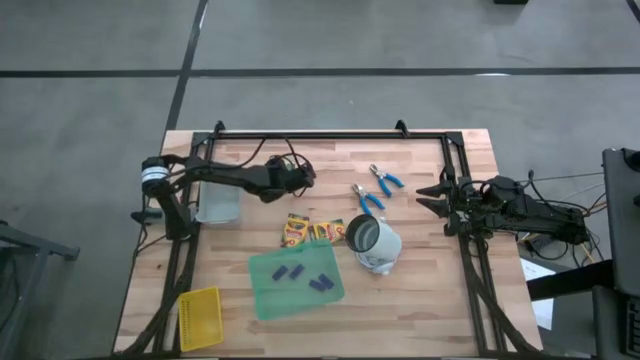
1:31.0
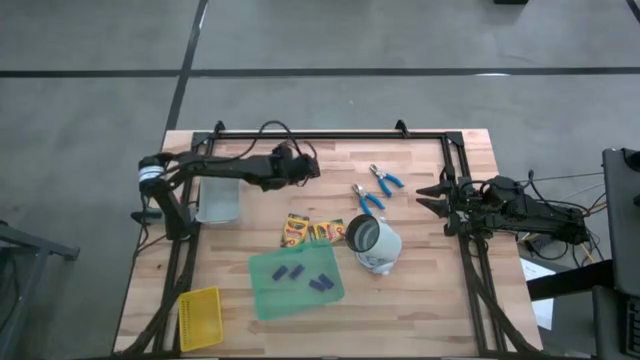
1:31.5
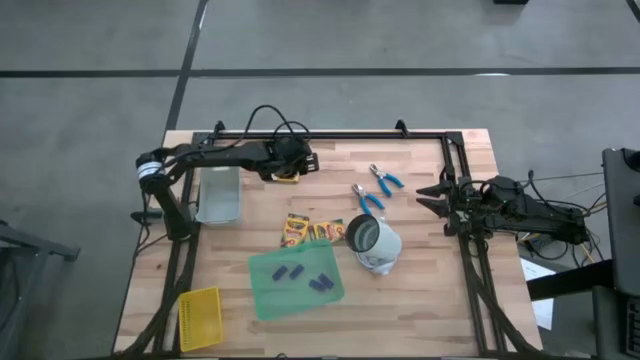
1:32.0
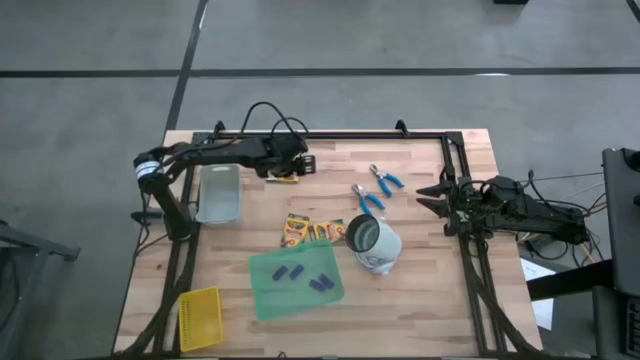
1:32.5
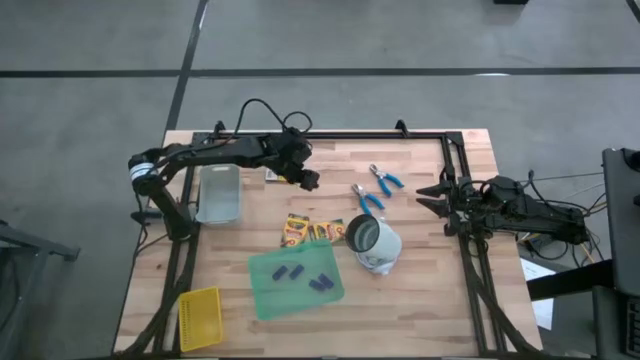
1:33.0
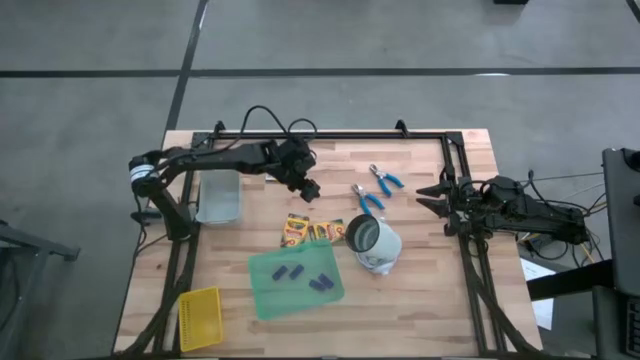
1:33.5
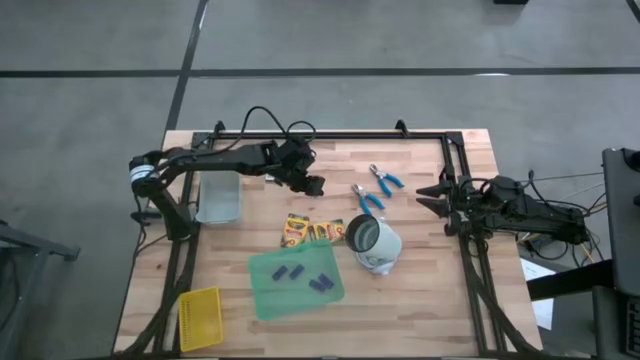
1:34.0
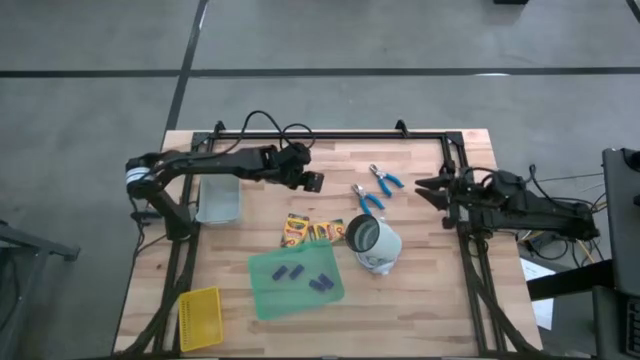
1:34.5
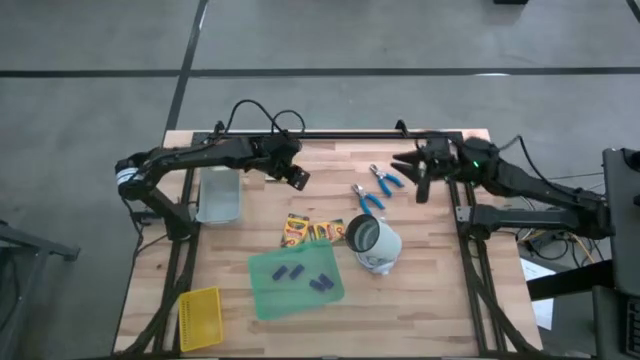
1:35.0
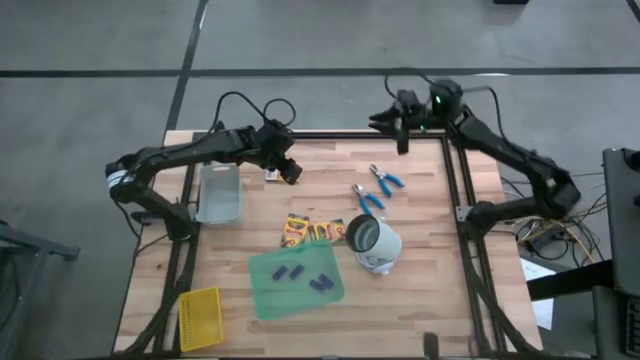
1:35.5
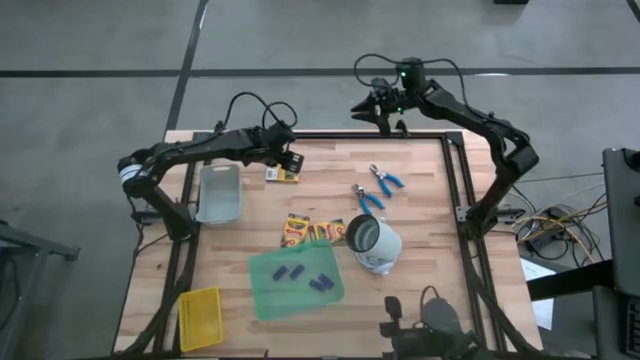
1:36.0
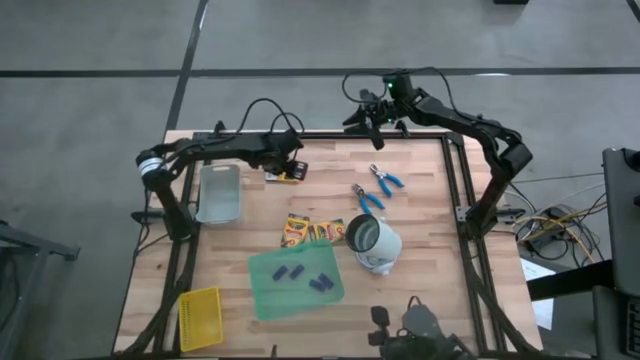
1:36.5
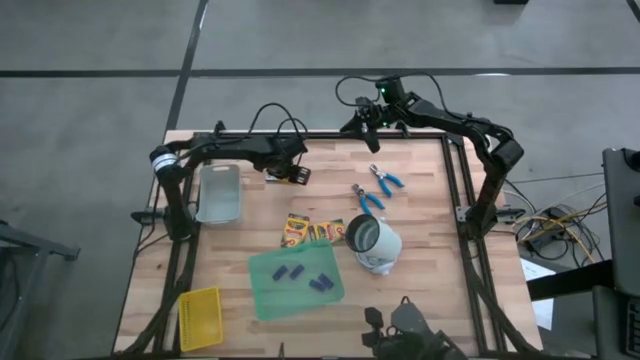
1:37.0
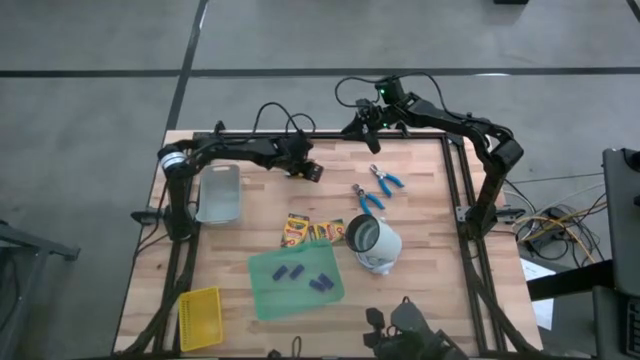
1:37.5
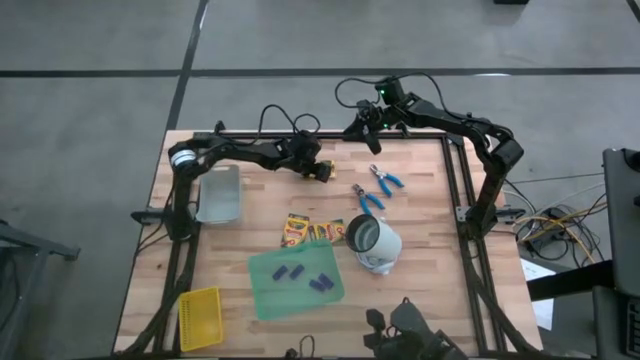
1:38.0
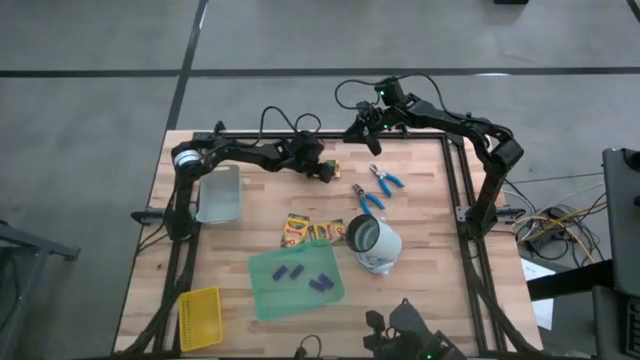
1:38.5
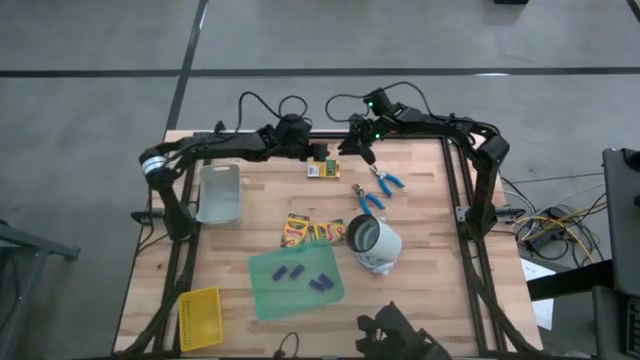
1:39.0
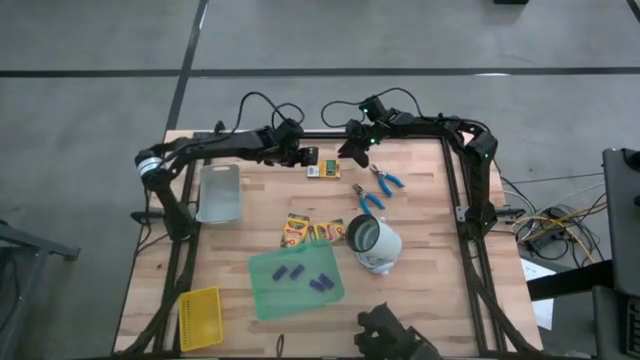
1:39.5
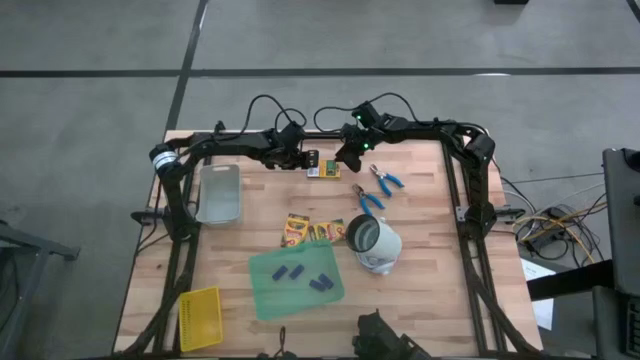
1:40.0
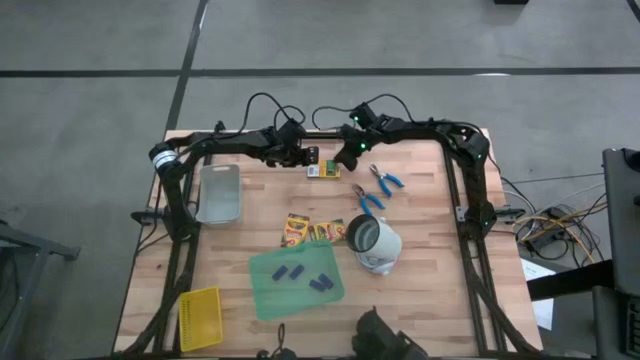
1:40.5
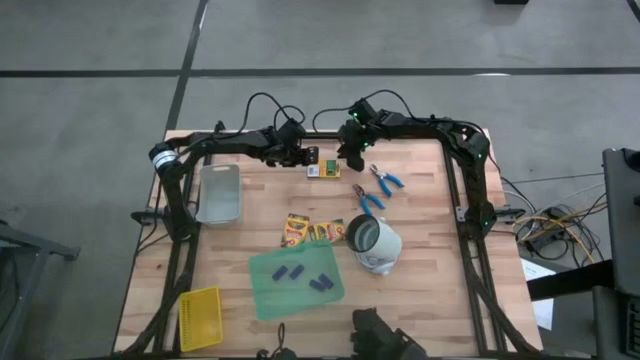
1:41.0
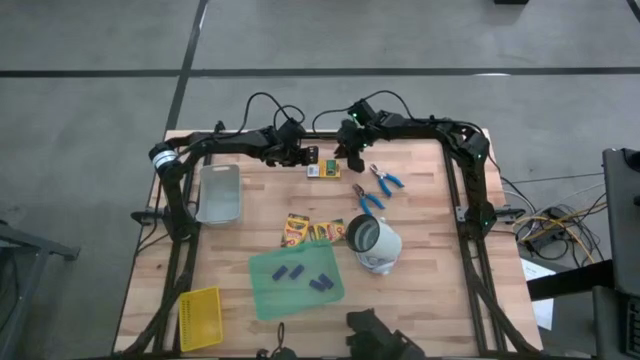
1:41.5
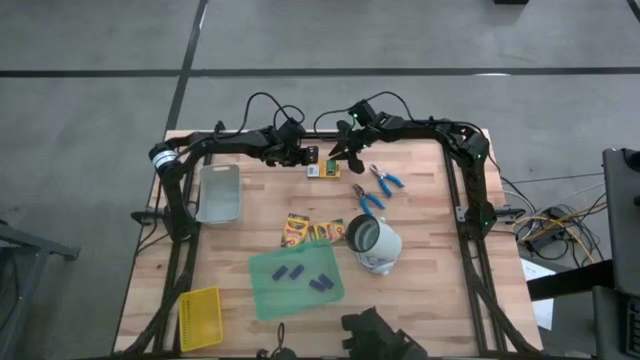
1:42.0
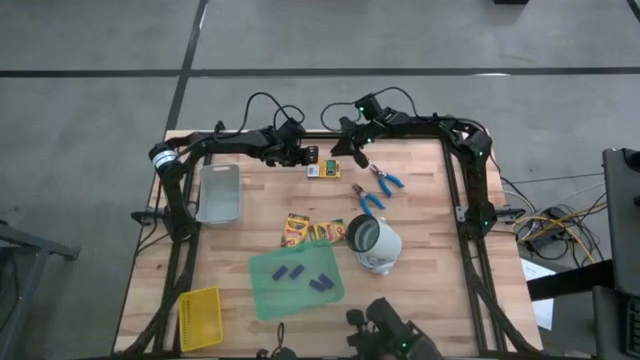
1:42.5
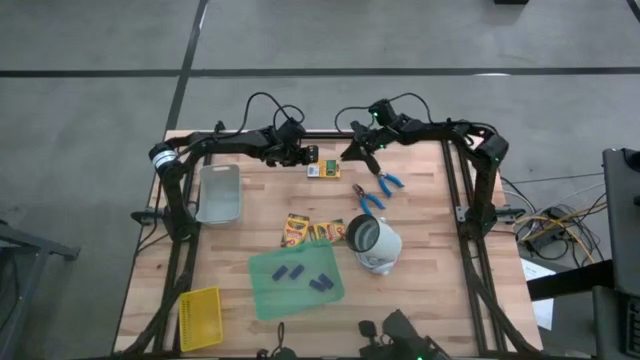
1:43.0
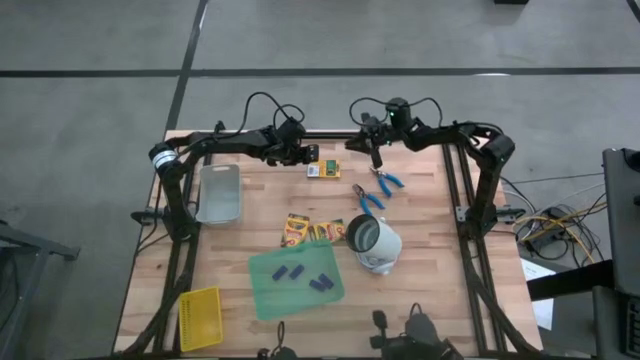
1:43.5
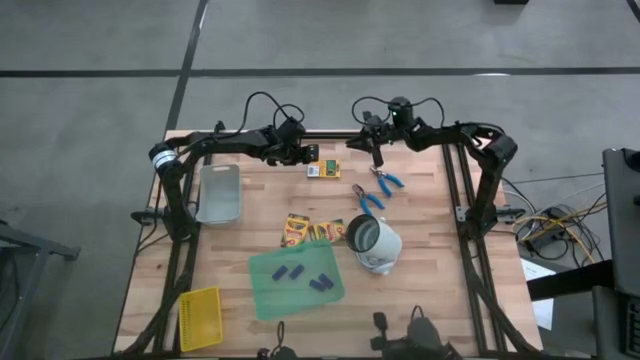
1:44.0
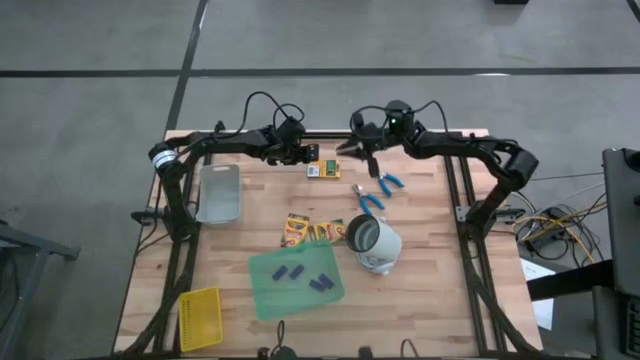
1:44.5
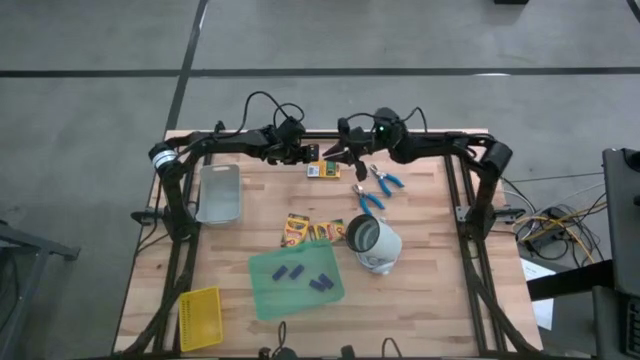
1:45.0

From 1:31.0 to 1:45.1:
Task: Pick & Place School Supplies
Put the yellow crayon box into the gray bin

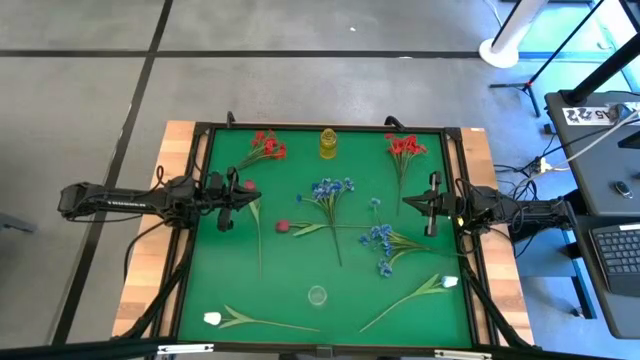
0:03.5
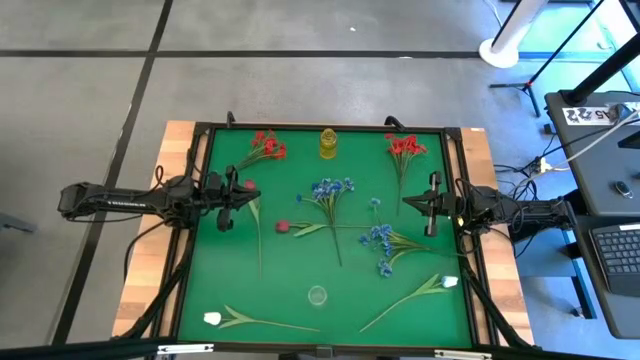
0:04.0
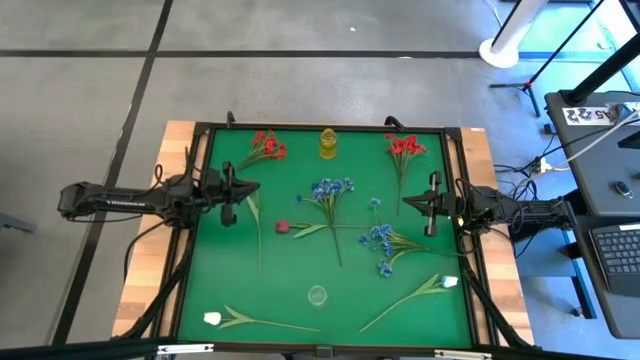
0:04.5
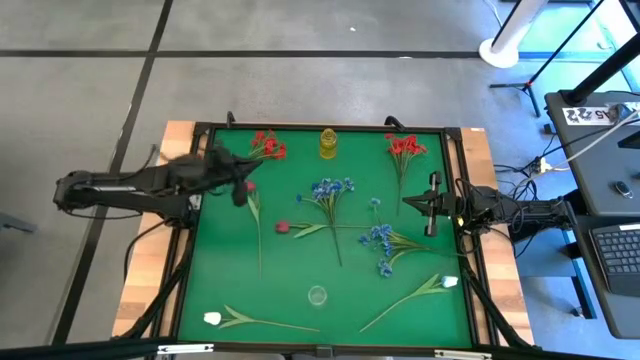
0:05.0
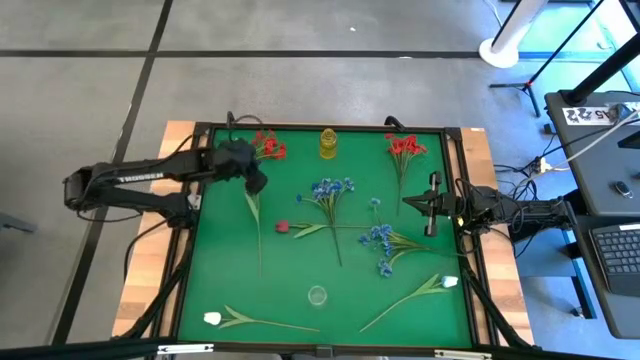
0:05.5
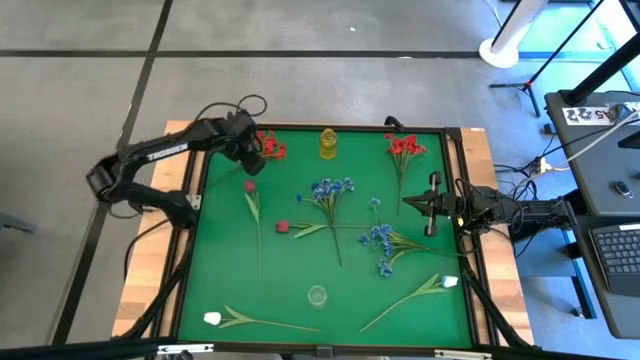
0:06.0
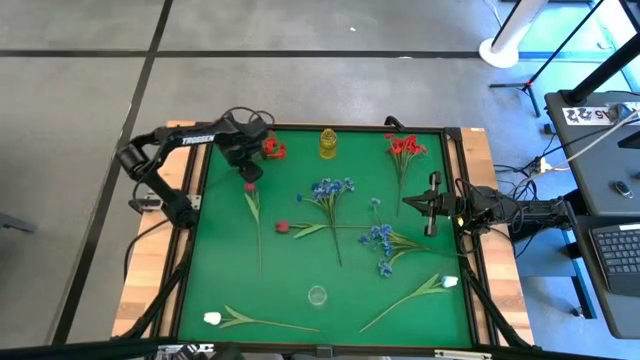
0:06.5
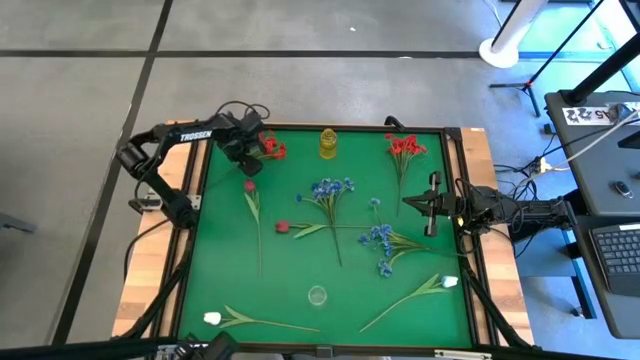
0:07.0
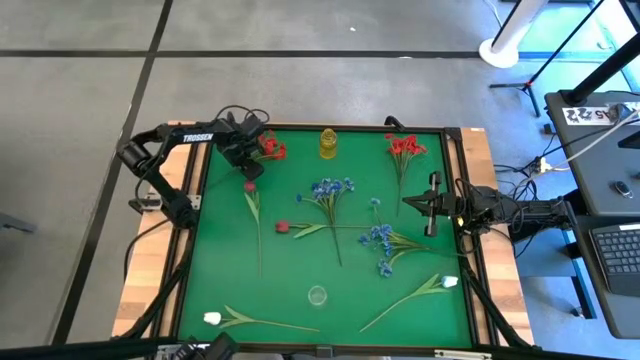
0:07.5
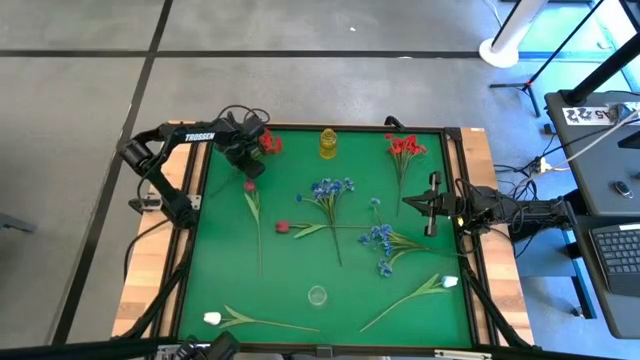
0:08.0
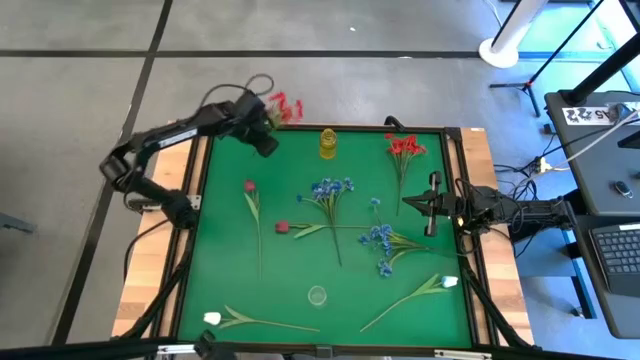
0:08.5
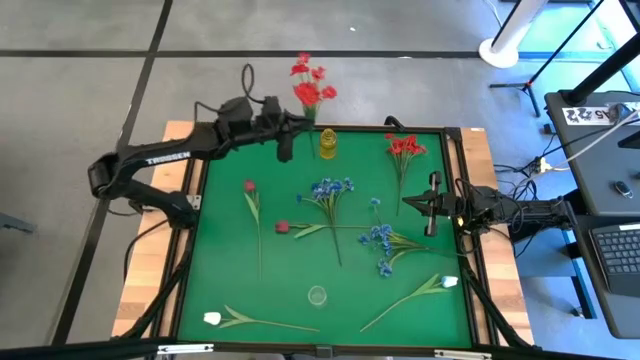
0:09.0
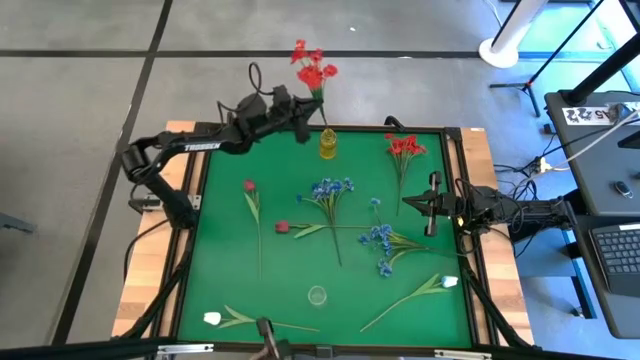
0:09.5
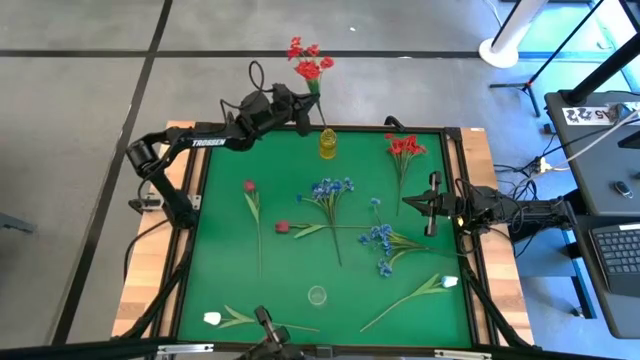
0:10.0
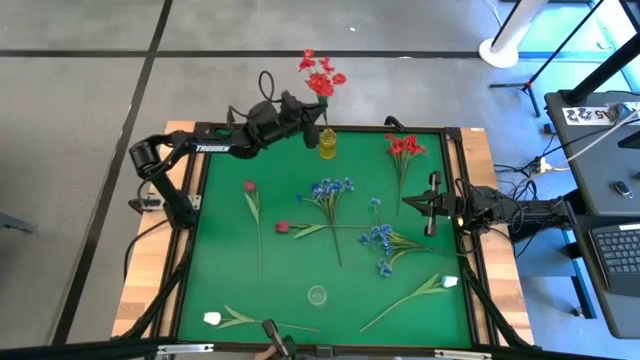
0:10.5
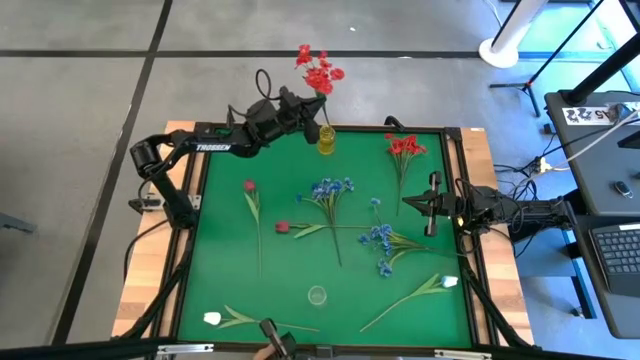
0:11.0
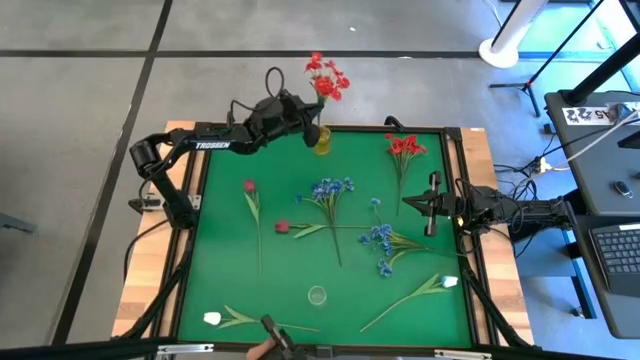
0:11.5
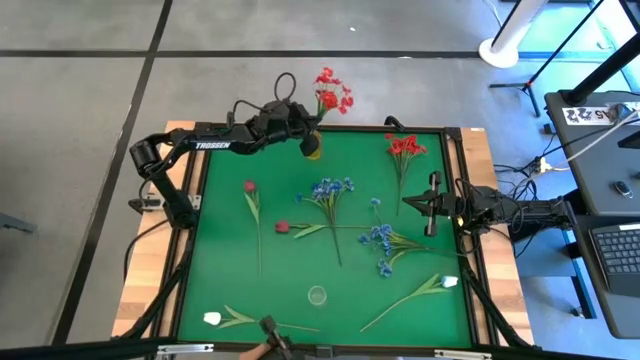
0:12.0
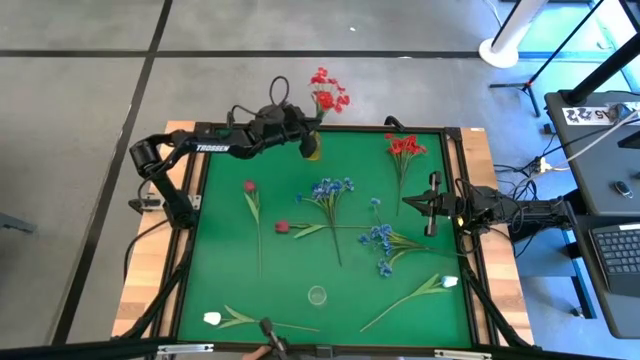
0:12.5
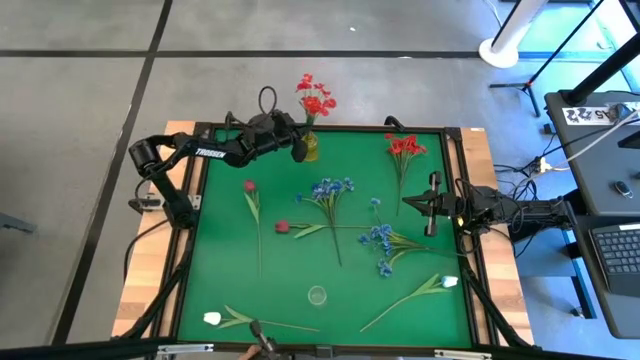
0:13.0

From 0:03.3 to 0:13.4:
Task: Sort flowers into vase by color
Put the left red flowers into the yellow vase
